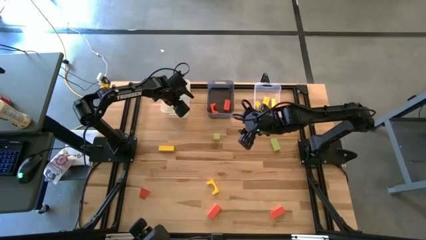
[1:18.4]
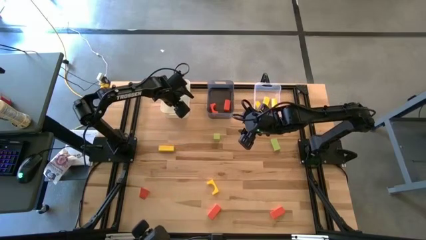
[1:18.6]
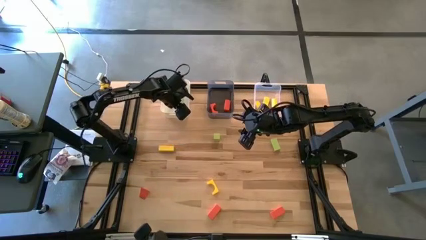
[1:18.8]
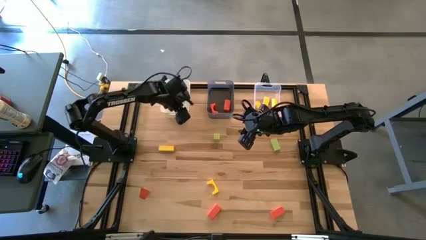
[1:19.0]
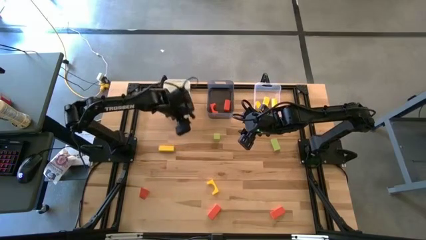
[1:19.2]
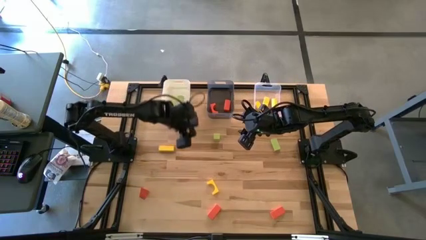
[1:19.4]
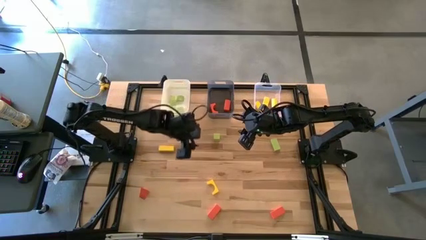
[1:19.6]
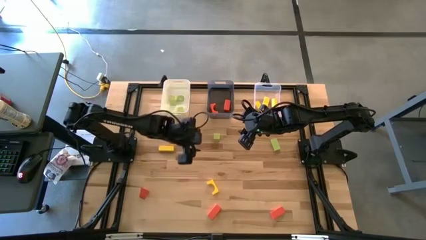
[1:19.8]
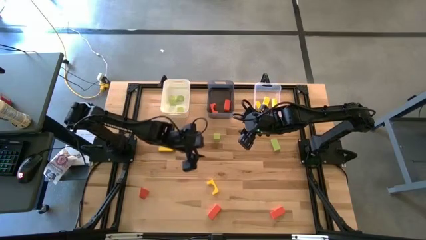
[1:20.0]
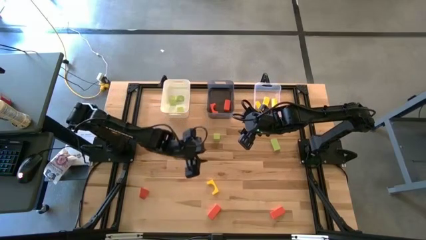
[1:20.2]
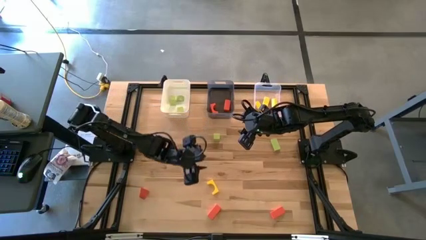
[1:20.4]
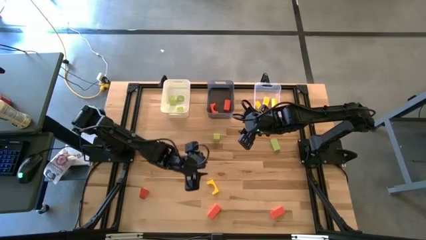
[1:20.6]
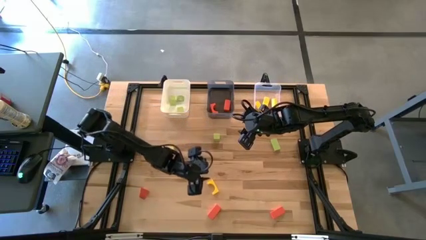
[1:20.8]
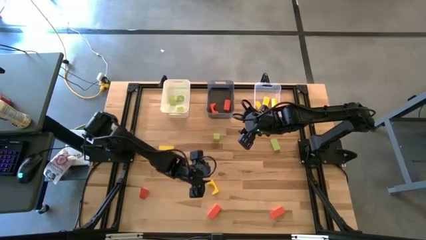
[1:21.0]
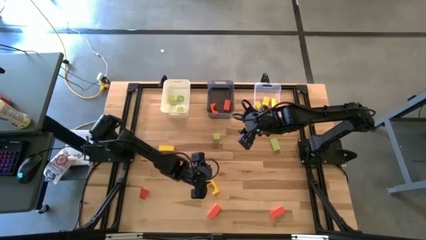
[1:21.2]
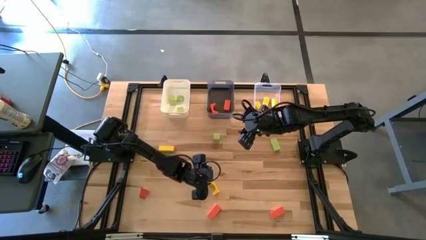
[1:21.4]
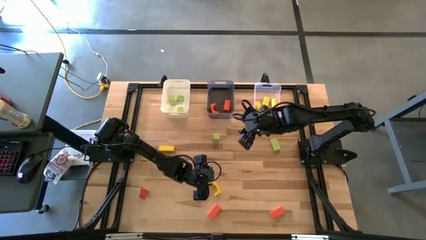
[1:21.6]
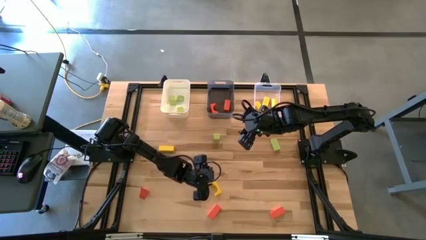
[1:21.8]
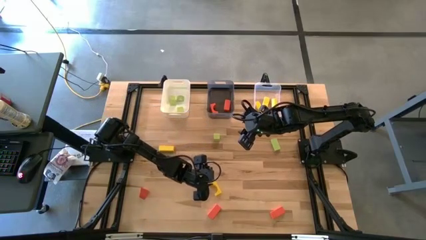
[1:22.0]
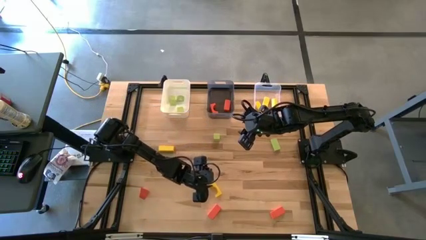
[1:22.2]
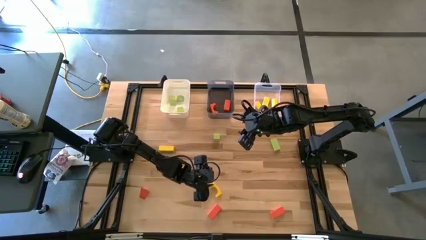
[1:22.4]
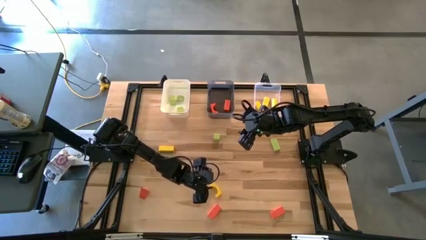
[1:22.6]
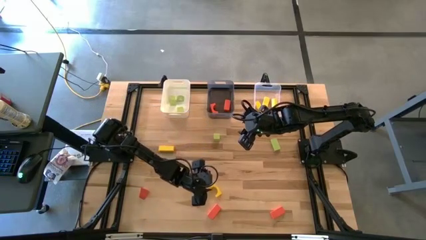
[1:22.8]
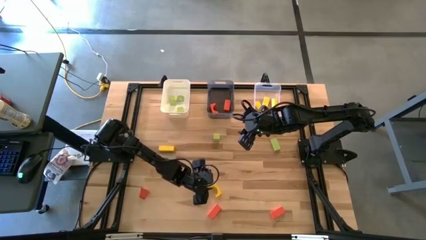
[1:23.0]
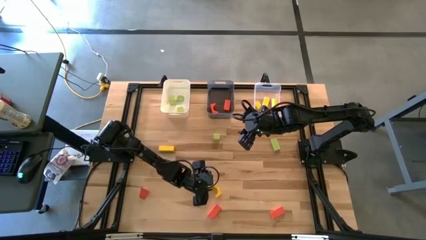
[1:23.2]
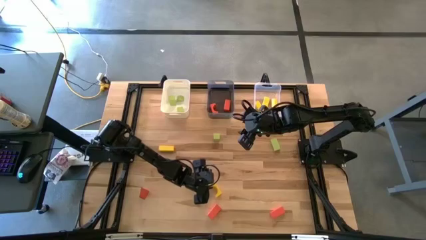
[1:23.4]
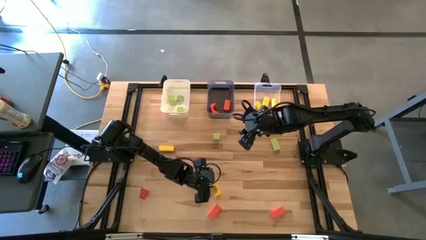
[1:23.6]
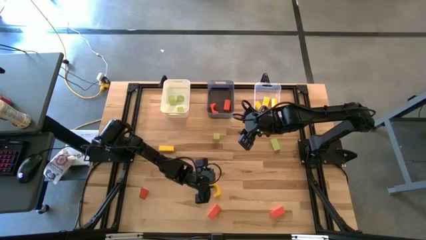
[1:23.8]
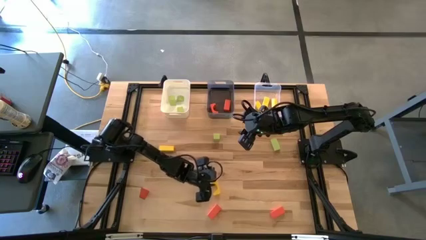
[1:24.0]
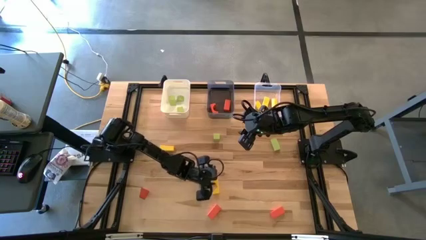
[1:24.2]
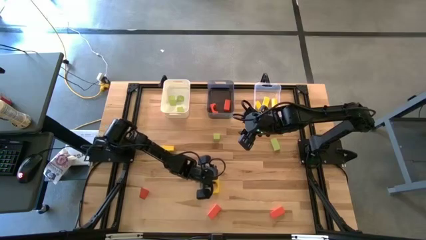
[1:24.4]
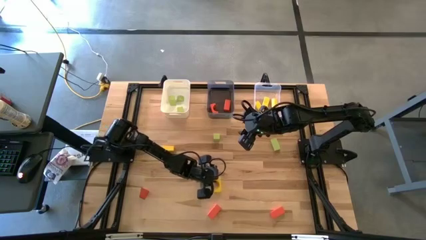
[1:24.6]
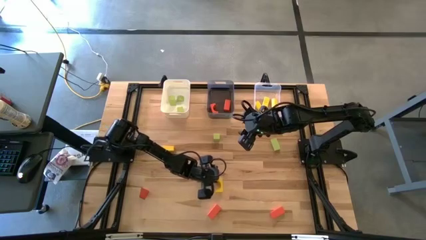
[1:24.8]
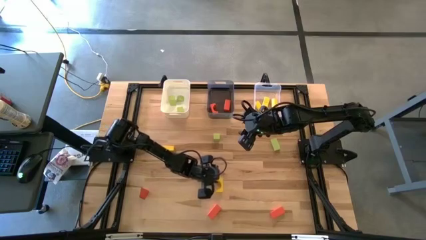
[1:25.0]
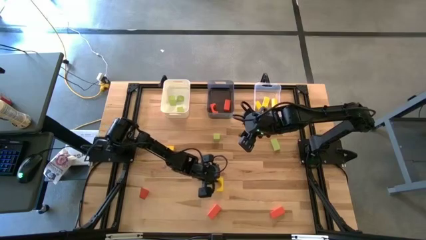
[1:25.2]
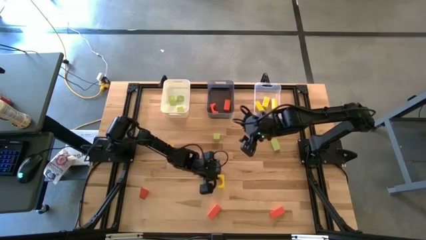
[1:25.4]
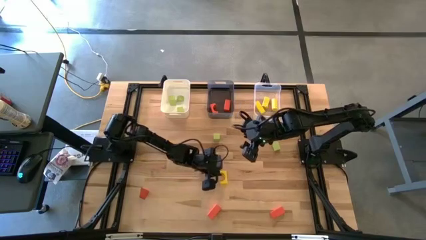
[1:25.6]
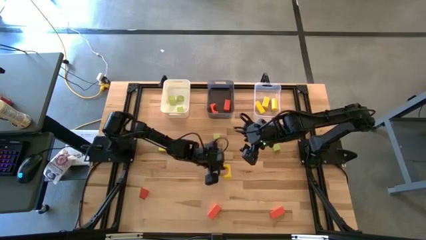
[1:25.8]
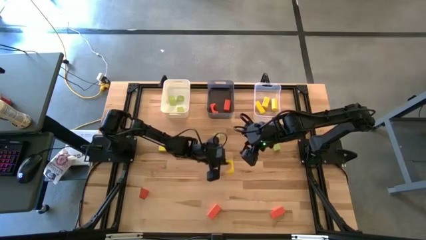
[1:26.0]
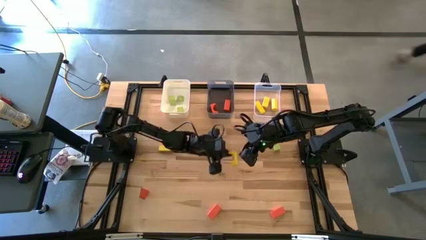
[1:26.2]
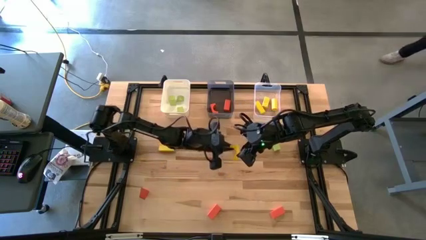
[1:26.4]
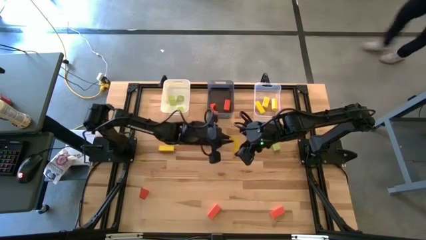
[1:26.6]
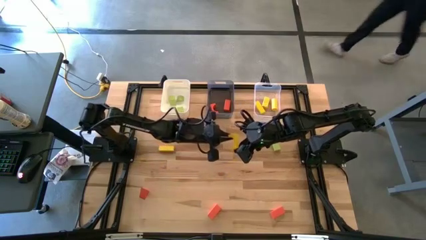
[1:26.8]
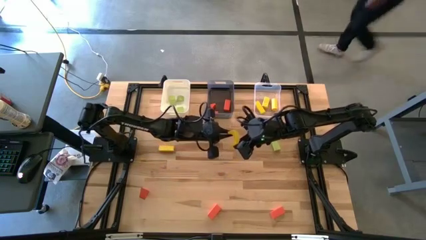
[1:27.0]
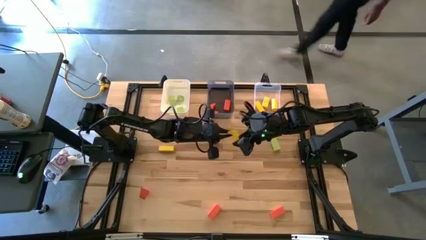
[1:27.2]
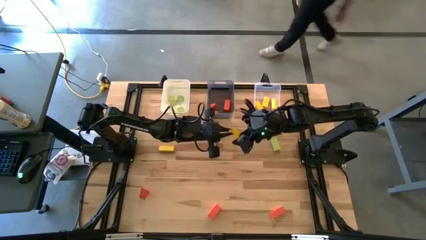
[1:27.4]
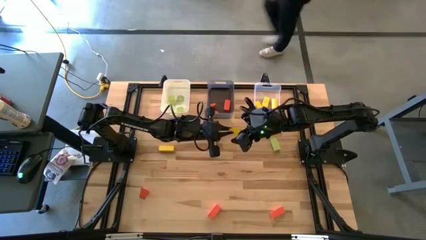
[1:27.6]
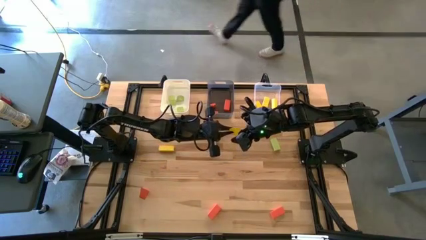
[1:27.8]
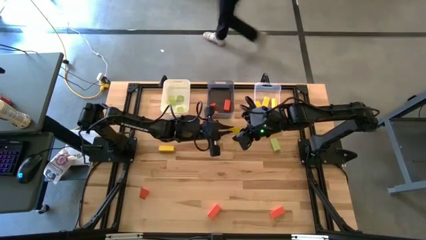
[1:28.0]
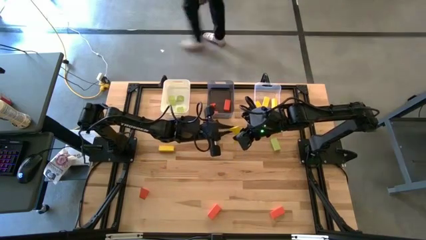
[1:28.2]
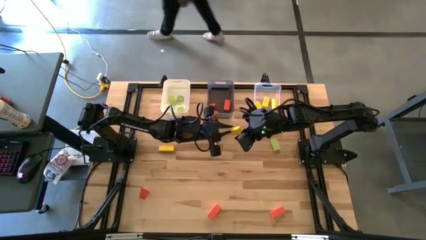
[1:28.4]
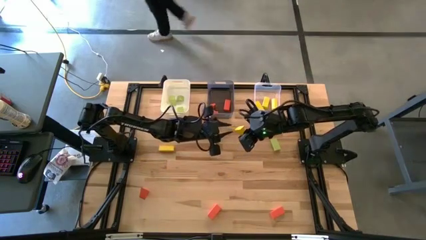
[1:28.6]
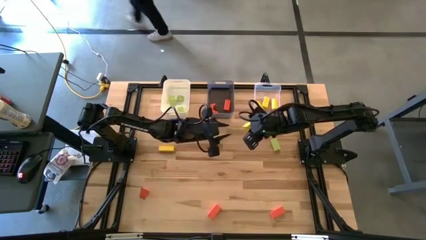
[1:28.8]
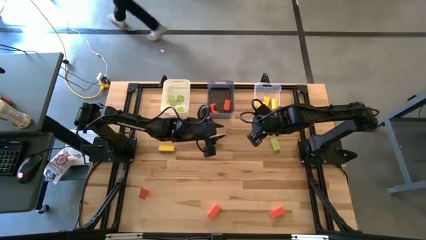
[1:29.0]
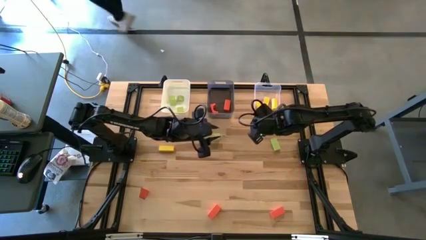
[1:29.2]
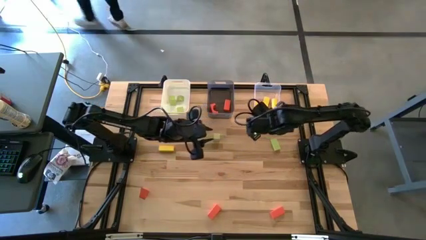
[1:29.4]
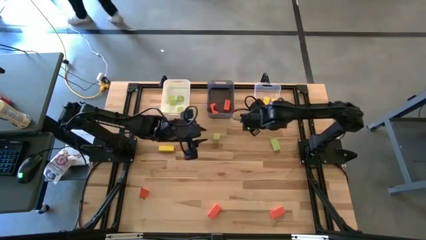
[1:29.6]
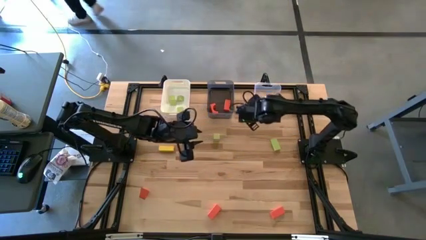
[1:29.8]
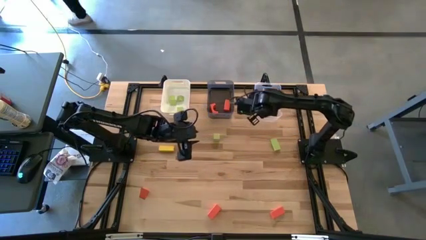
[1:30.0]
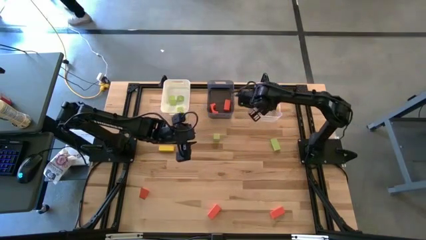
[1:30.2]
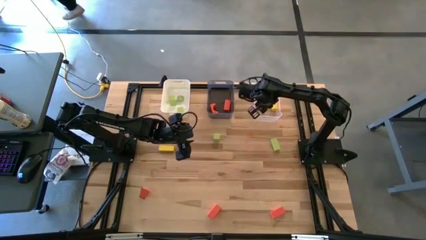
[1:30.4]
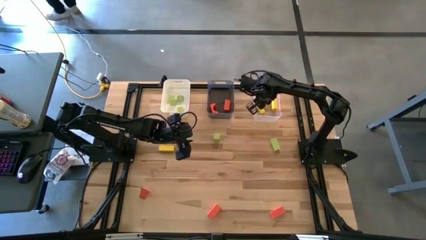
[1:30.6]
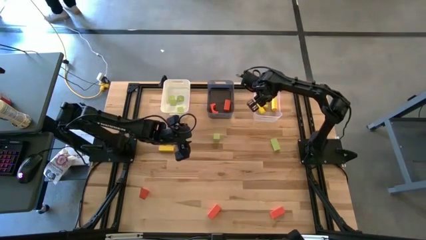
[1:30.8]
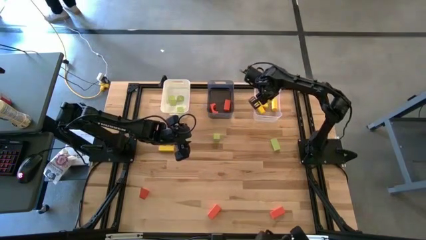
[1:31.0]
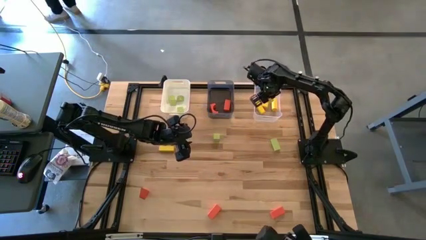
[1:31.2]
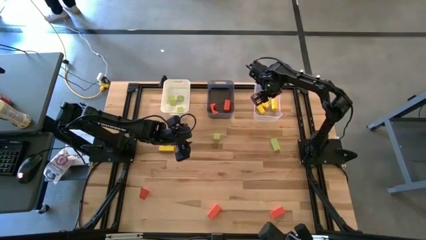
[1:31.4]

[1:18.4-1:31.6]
Task: Sort & place blocks by color
Put the yellow block into the transparent bin
